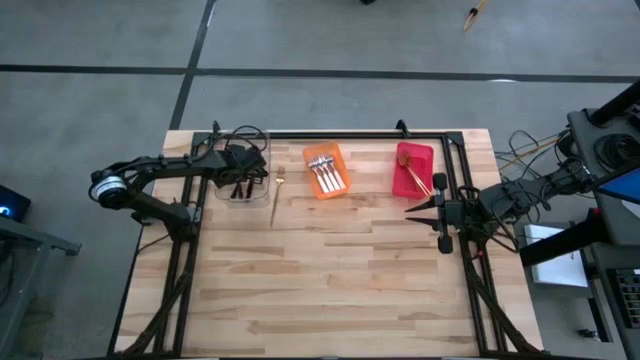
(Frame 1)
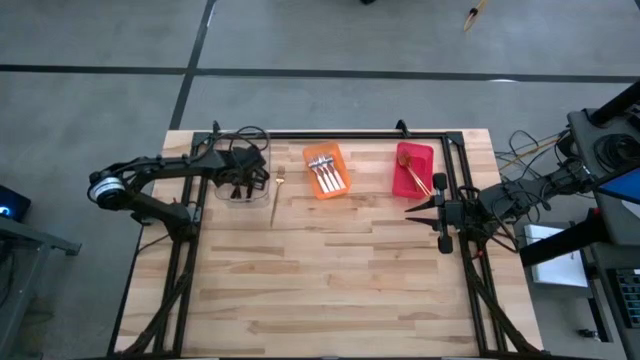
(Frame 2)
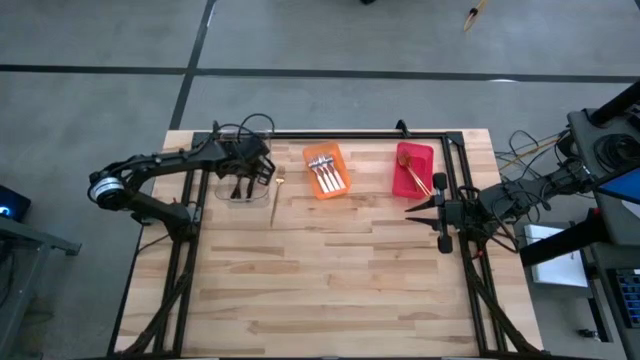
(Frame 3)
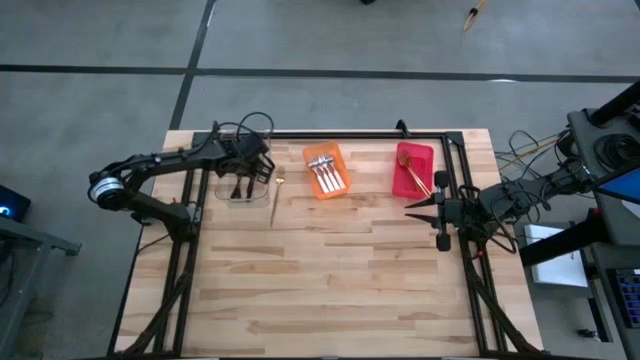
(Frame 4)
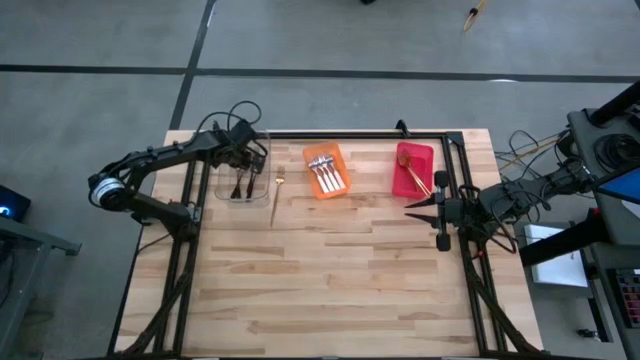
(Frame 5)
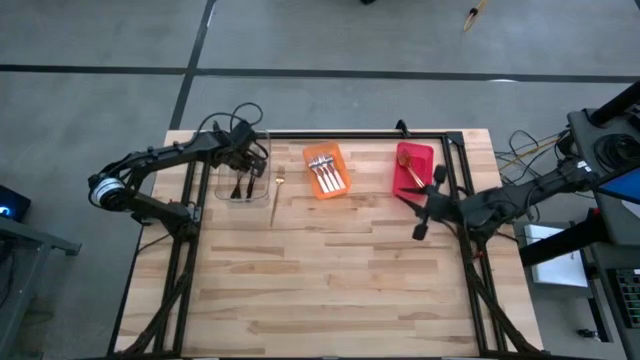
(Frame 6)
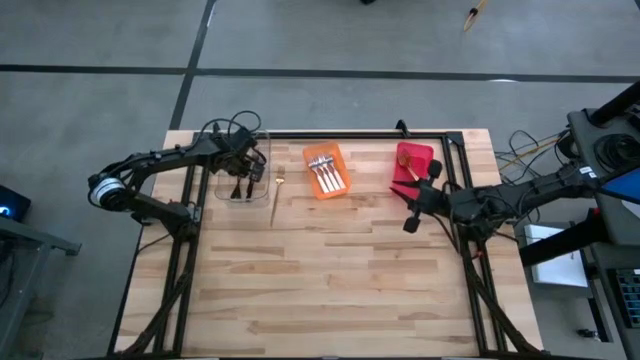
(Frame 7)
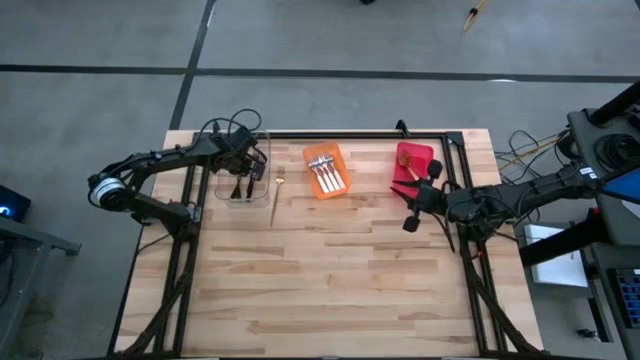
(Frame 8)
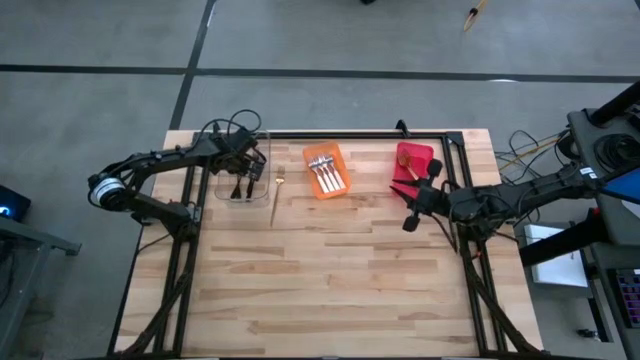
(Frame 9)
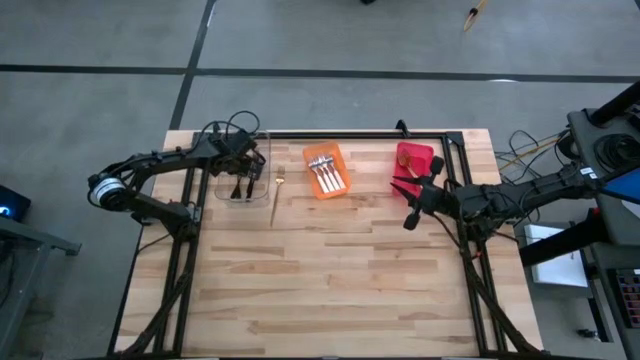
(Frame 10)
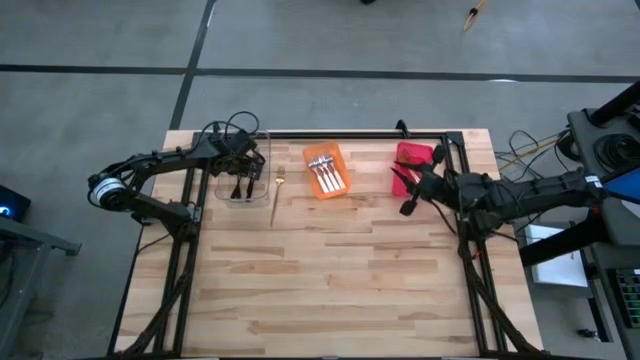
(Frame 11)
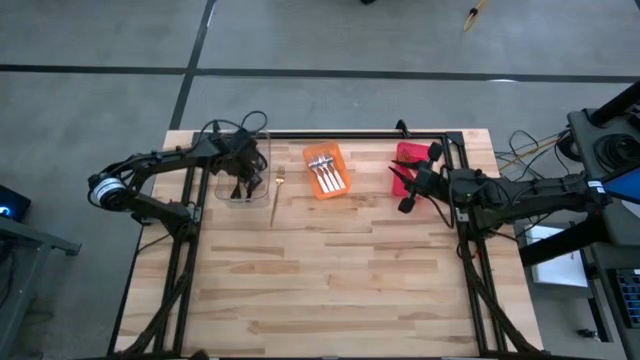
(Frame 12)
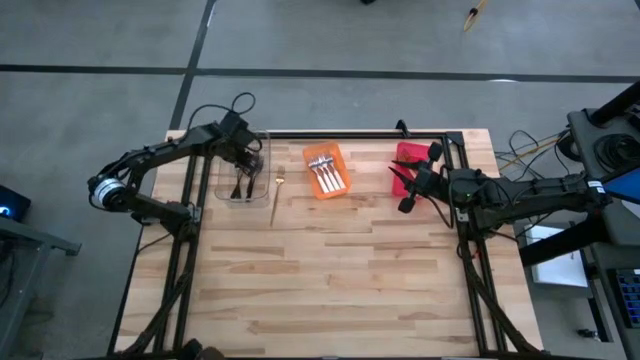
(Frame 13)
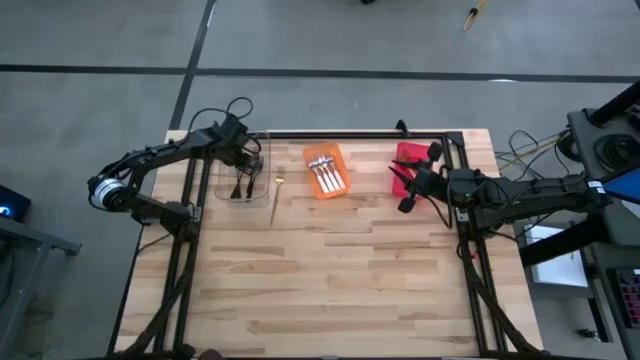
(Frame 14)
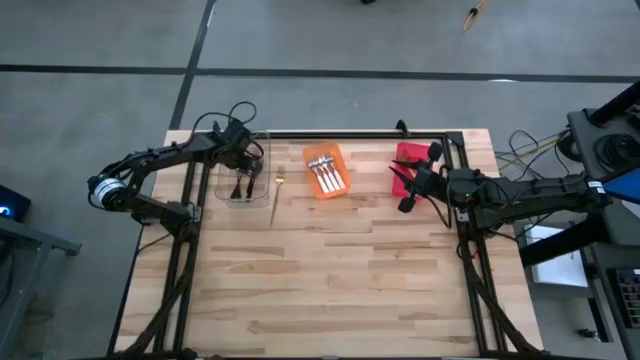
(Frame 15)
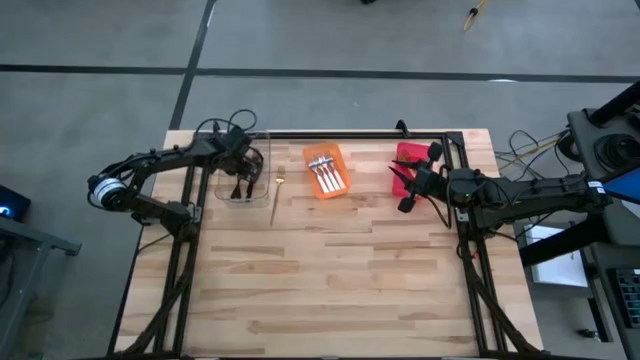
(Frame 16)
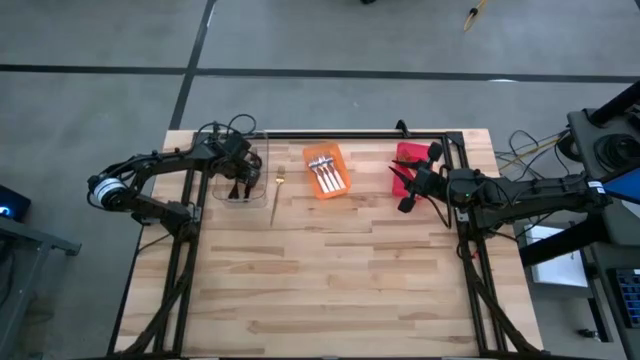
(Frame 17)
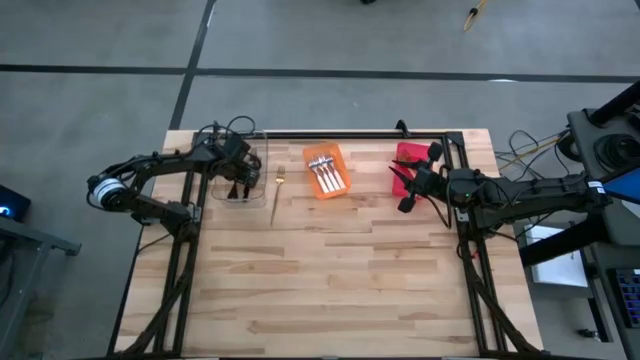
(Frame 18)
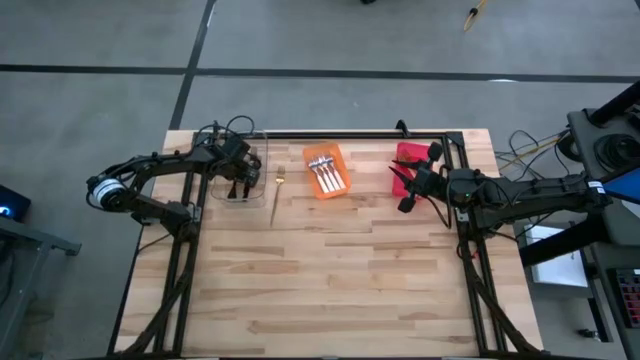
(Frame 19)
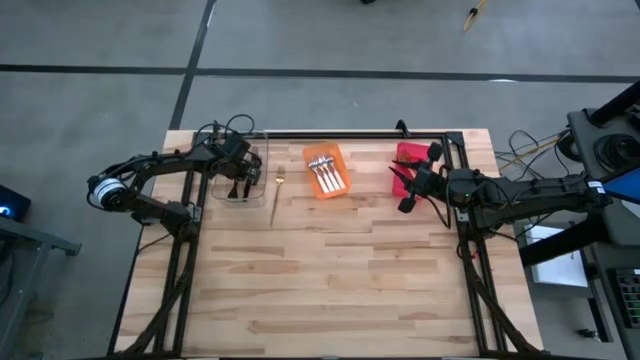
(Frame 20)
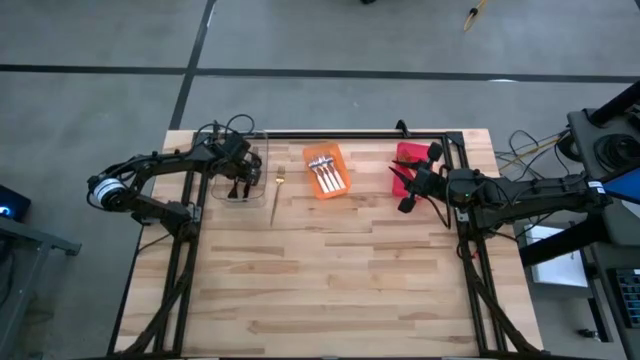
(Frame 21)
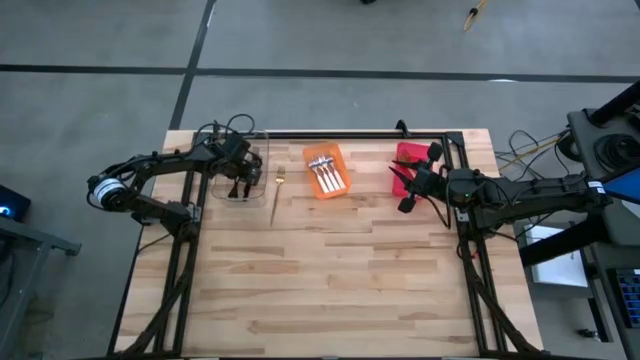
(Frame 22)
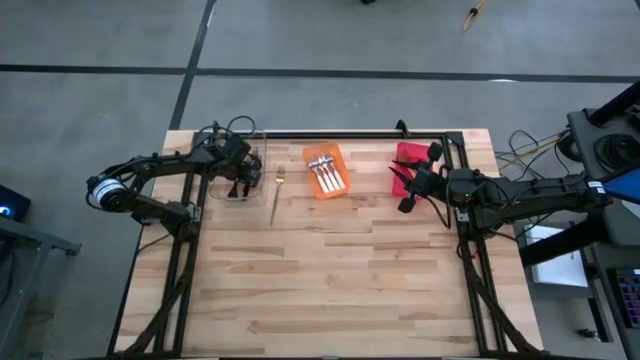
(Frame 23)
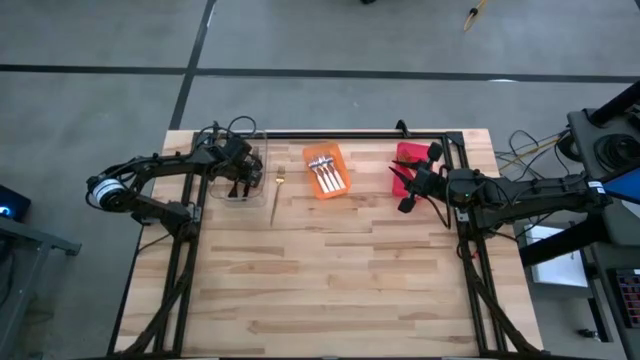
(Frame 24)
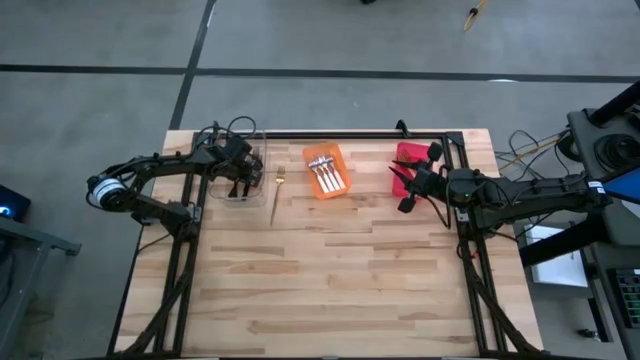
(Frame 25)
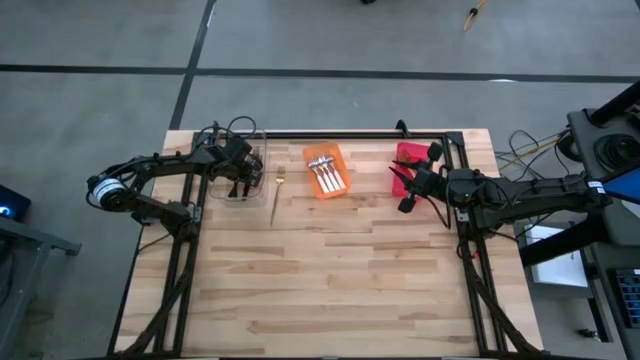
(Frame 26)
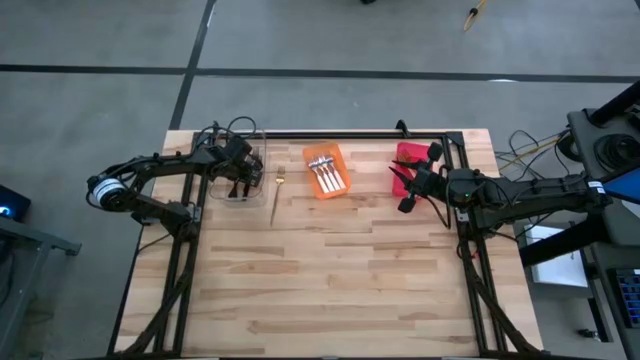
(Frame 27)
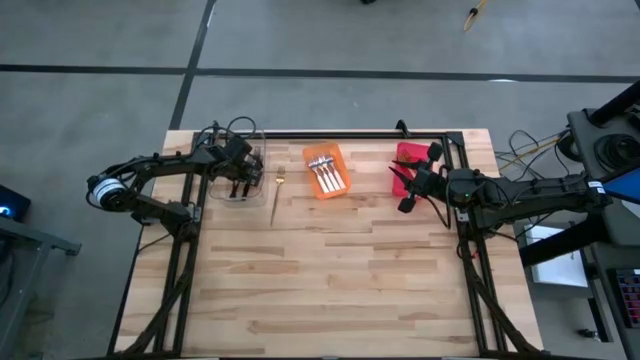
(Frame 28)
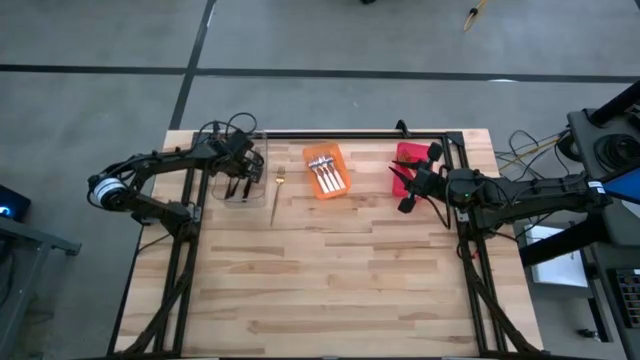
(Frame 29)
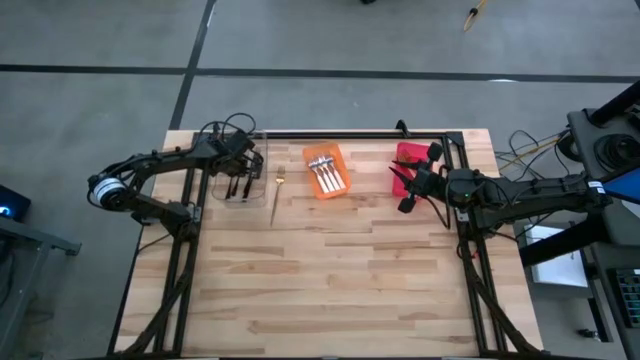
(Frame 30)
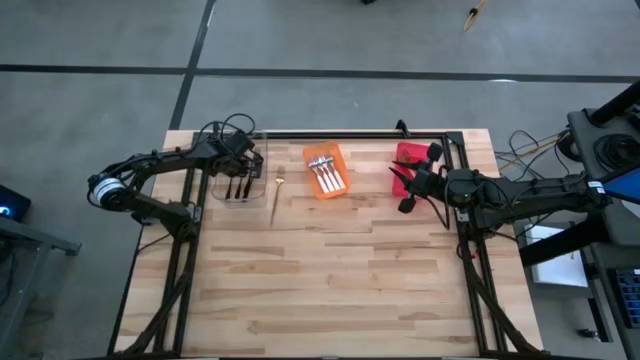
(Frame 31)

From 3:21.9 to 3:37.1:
Task: Sort silverware by color (type)
Adjust the black fork

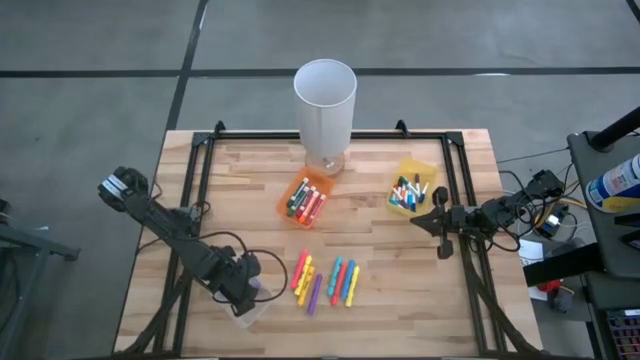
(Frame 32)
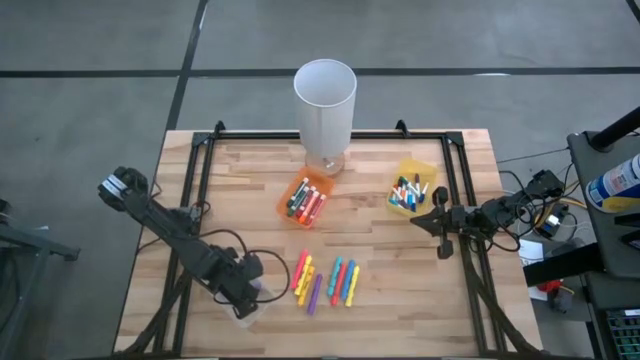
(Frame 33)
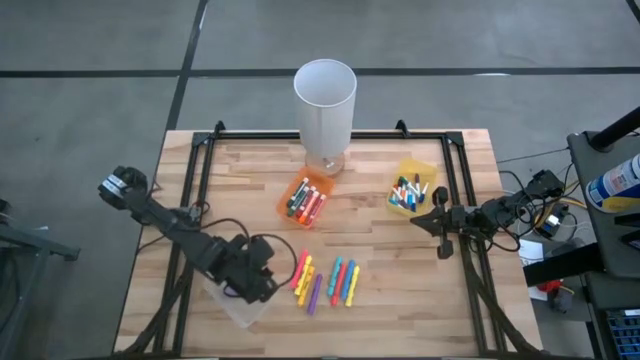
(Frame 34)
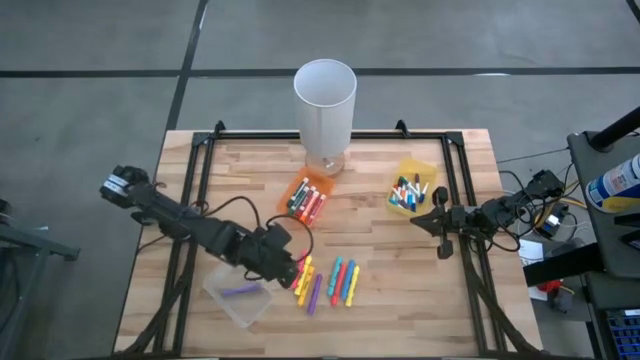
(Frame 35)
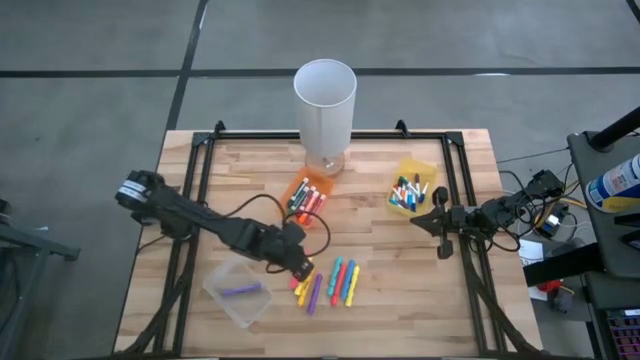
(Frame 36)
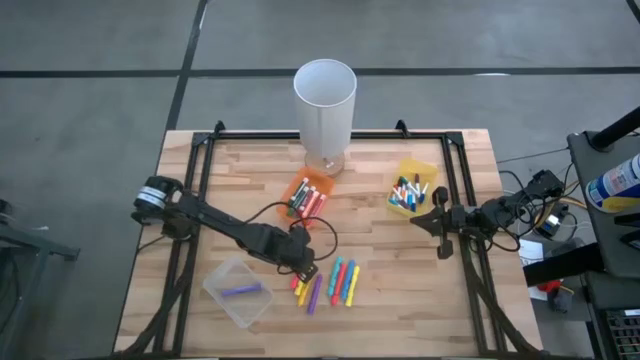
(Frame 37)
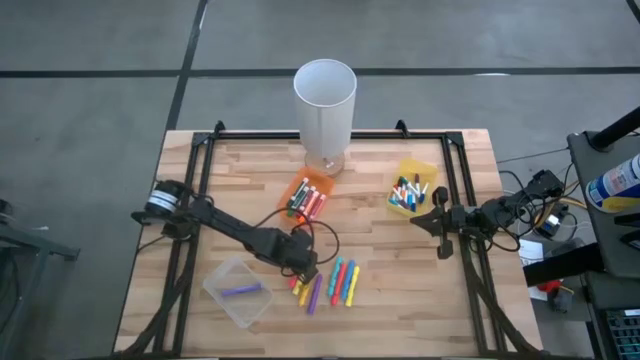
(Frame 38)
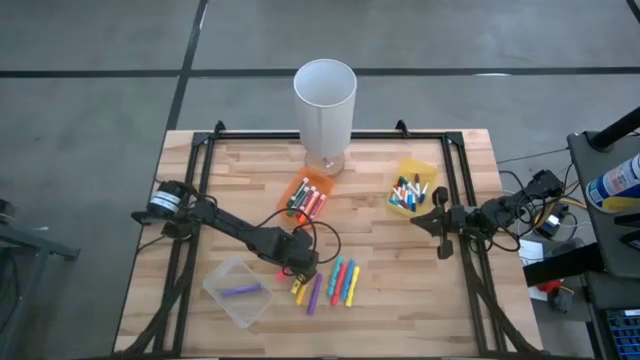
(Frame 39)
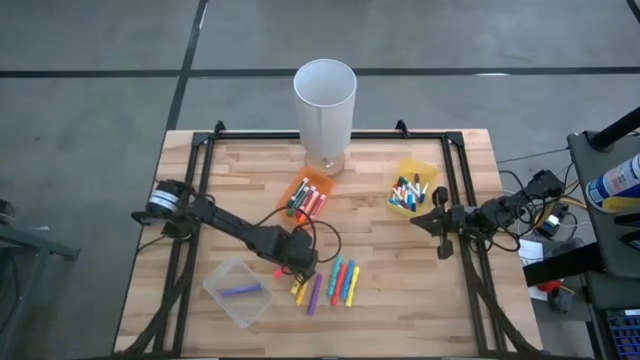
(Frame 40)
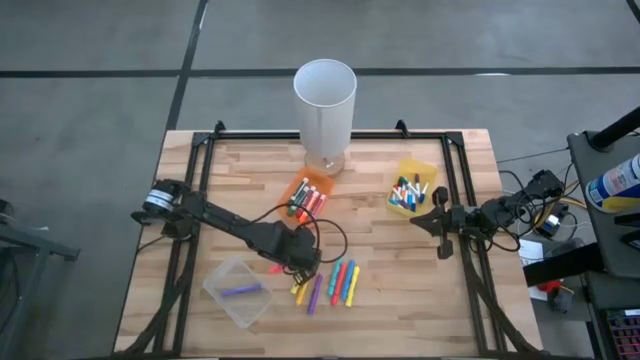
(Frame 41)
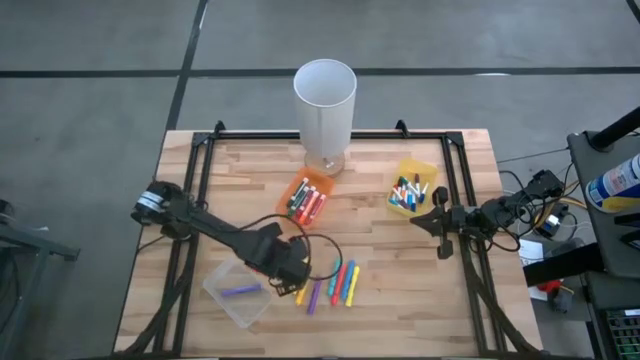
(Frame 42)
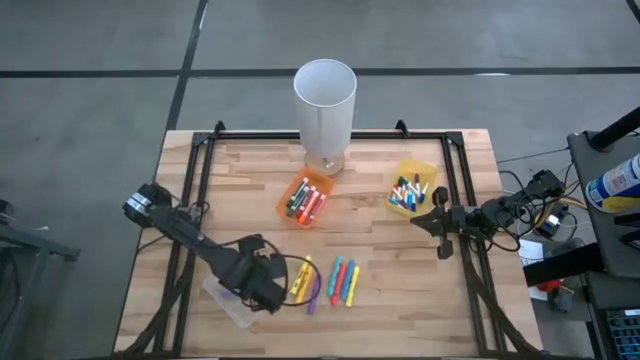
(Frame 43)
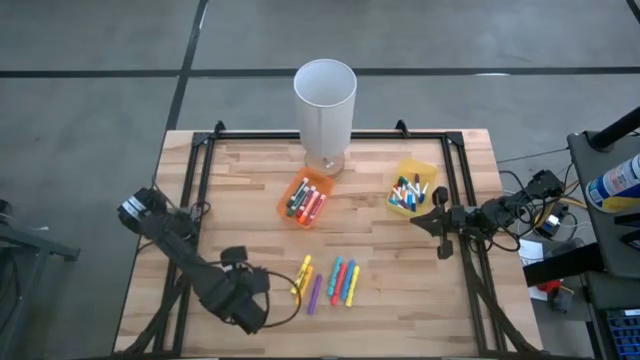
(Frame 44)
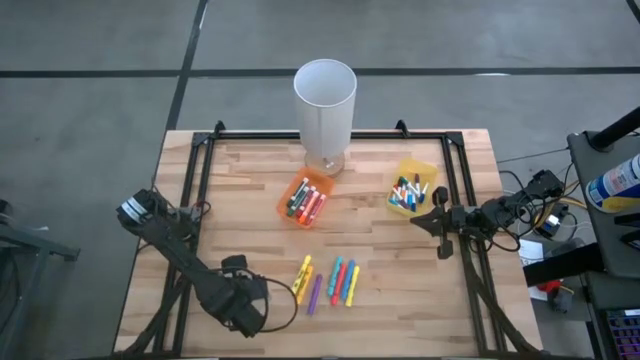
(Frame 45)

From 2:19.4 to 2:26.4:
Task: Pick & Place Markers
Put the pink highlighter pen into the white bin
